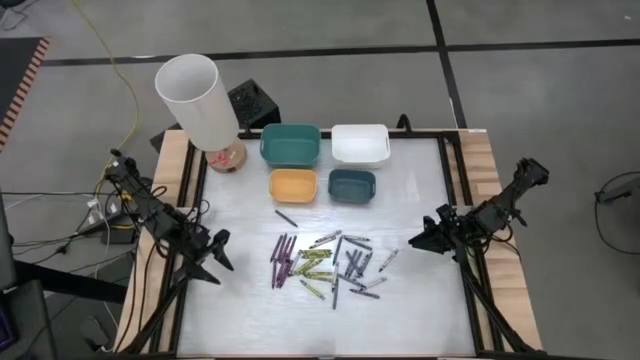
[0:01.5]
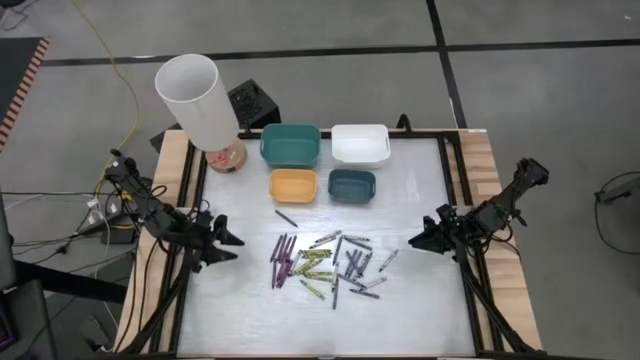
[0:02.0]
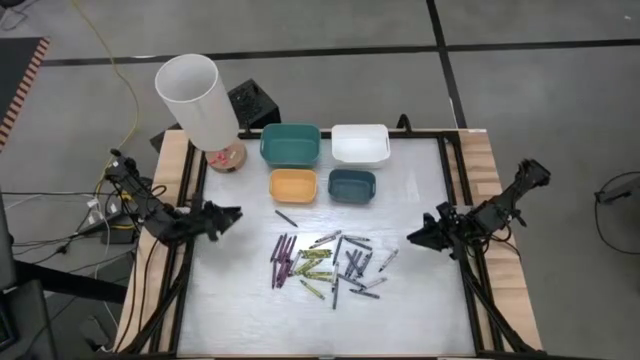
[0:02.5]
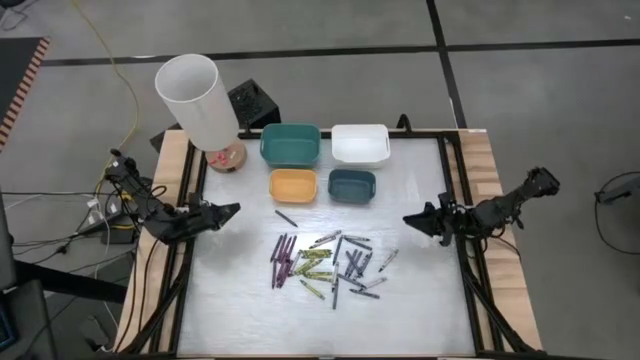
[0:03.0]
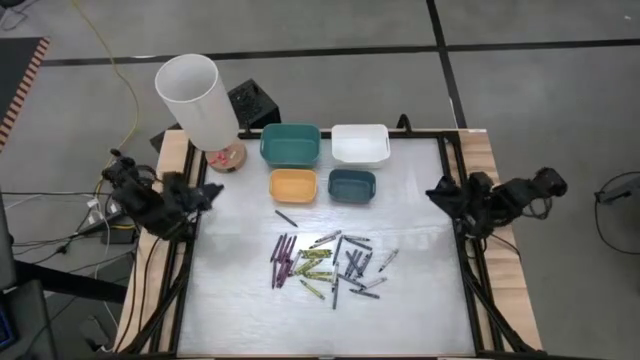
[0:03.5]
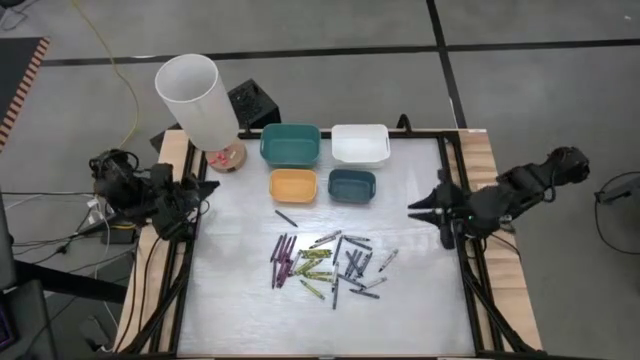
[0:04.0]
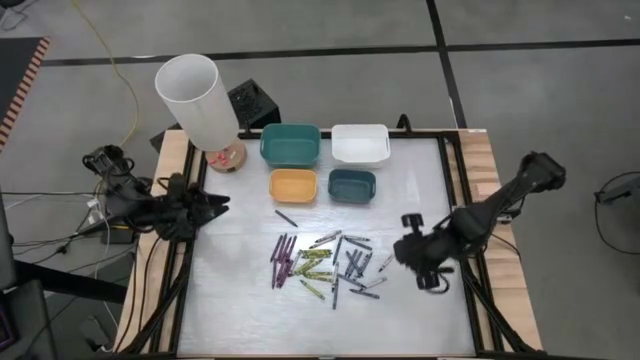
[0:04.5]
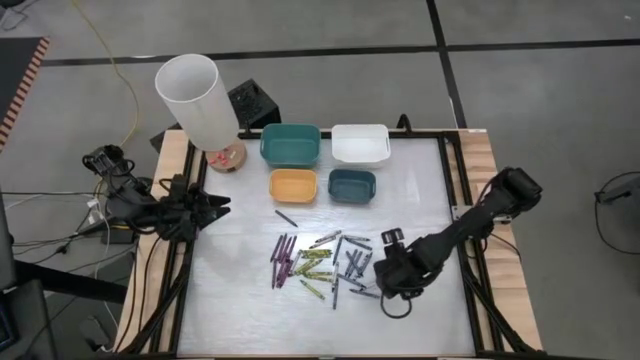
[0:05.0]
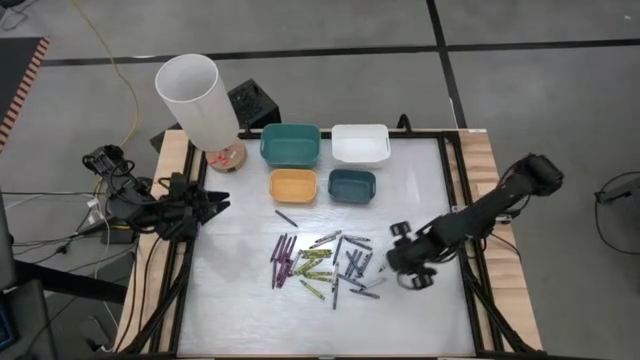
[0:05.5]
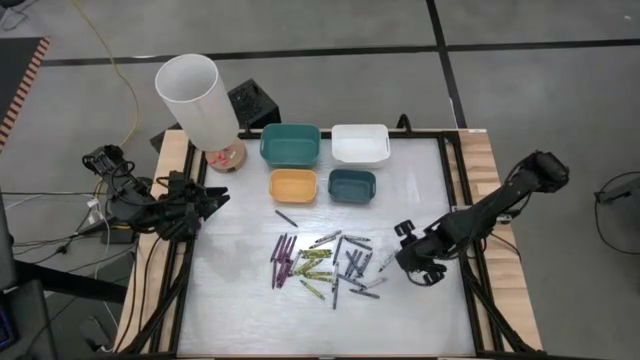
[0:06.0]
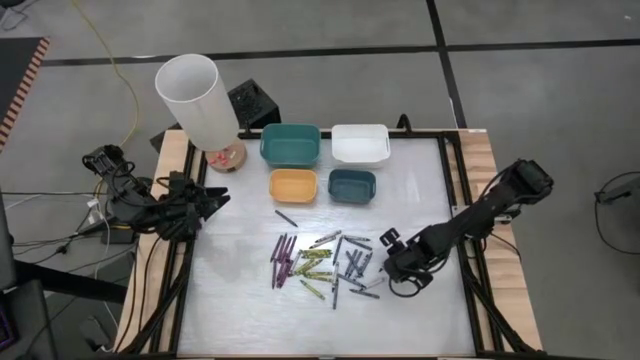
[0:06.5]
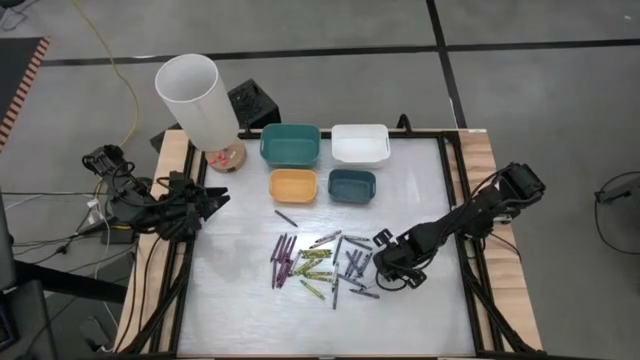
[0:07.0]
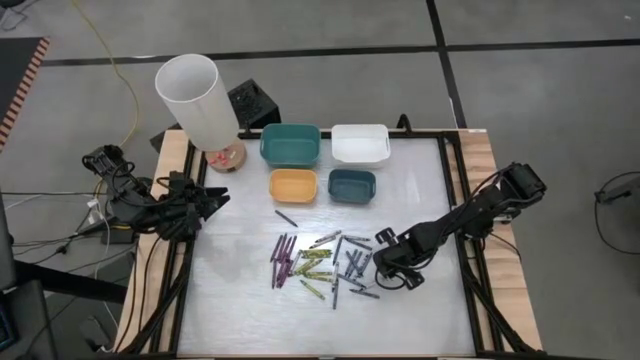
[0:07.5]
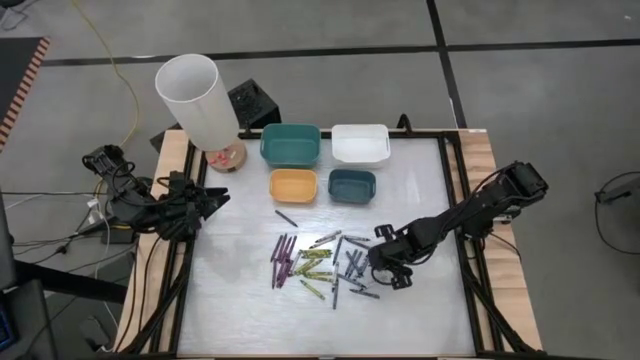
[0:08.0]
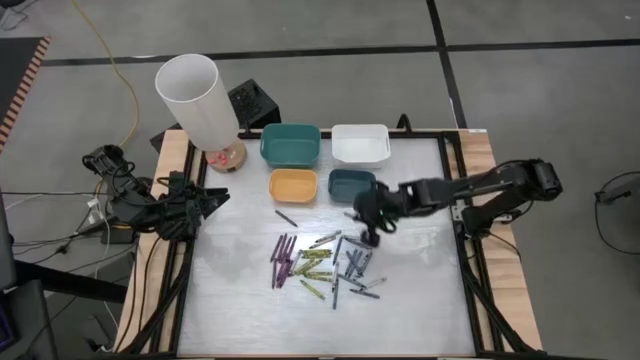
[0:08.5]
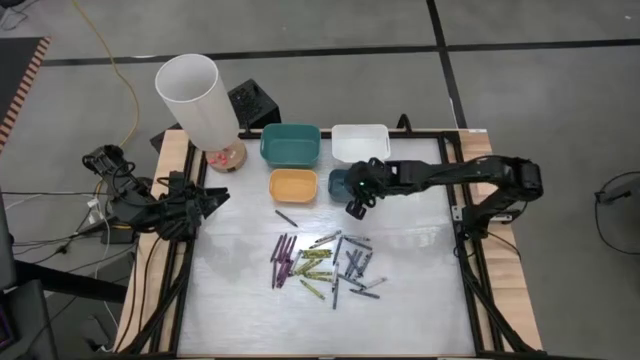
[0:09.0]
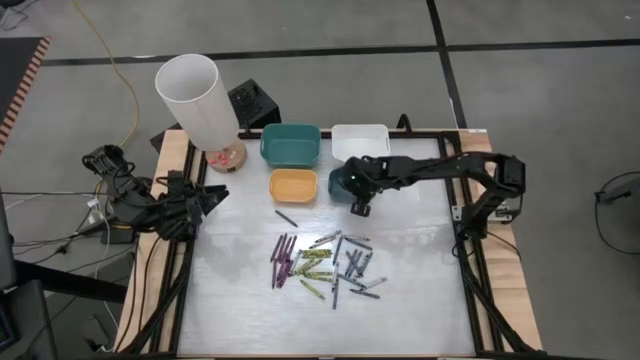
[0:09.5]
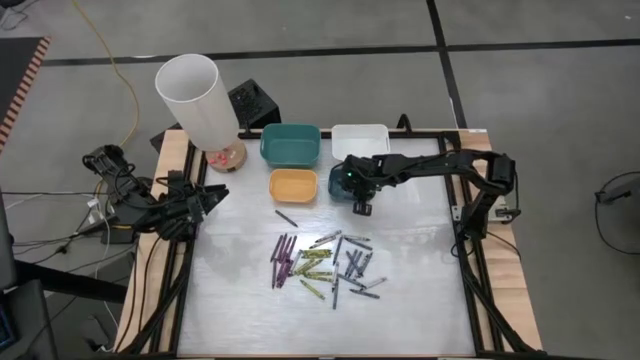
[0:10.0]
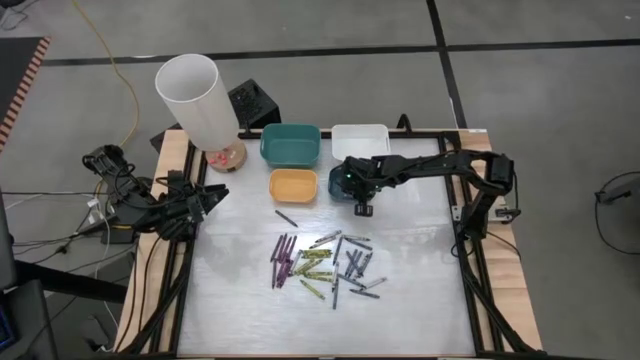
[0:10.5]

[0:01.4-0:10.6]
Task: Sort crayons
Put the black crayon into the blue bin

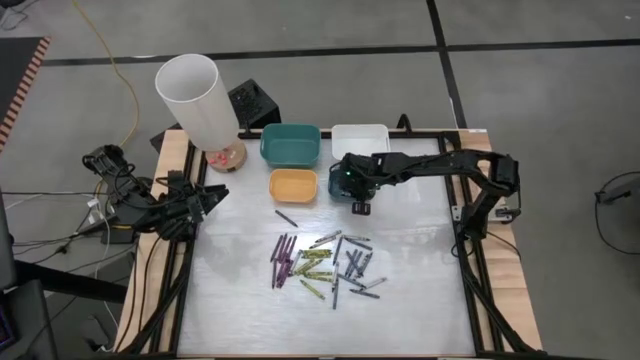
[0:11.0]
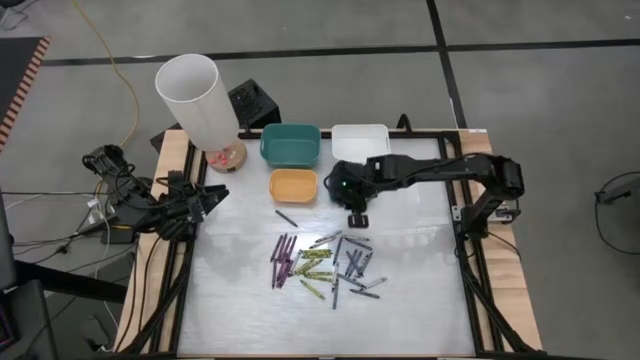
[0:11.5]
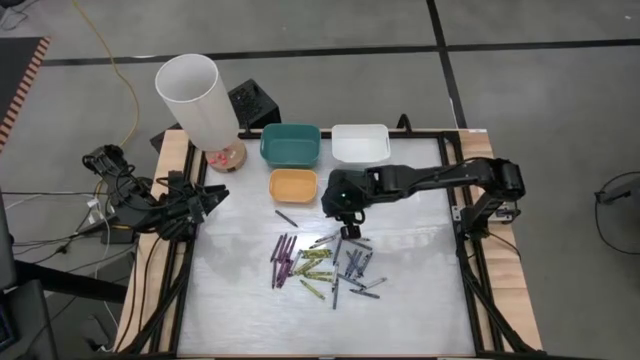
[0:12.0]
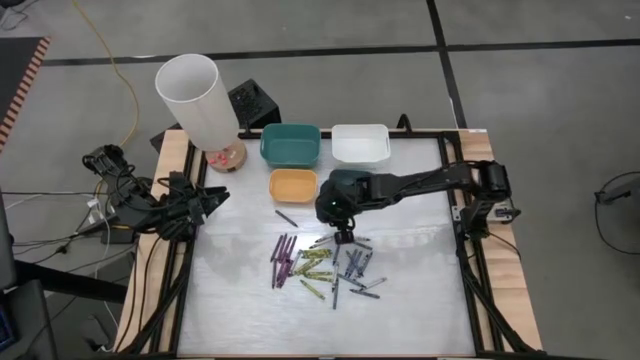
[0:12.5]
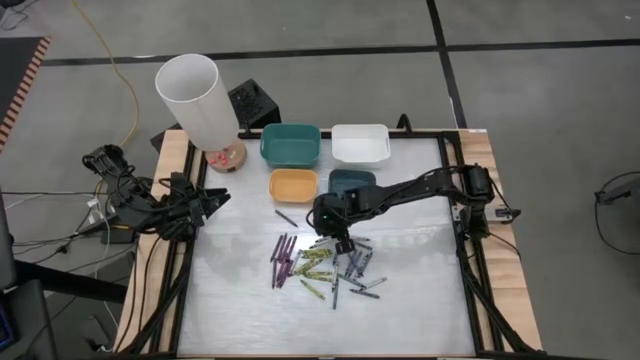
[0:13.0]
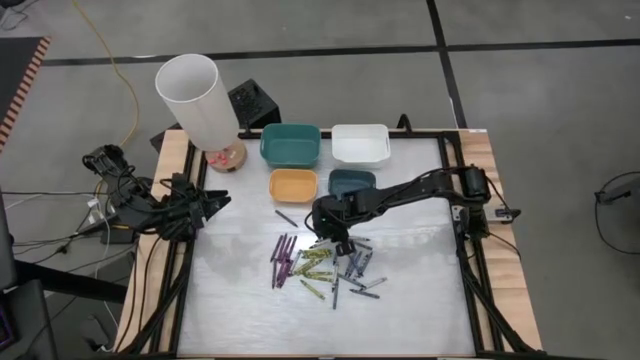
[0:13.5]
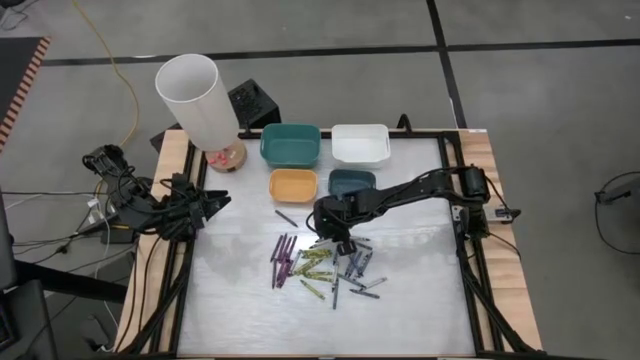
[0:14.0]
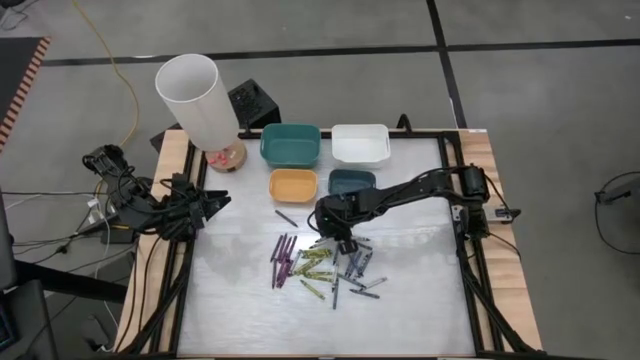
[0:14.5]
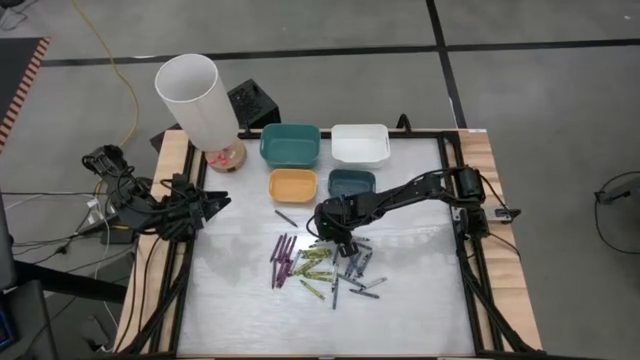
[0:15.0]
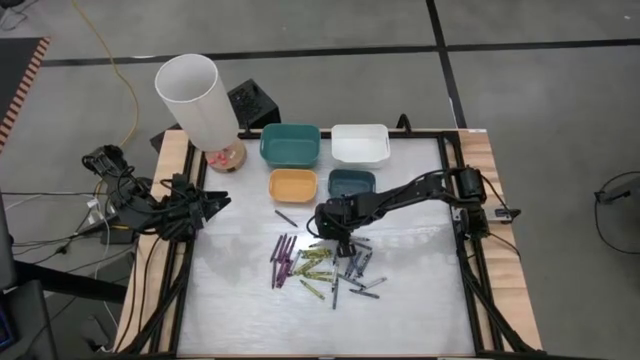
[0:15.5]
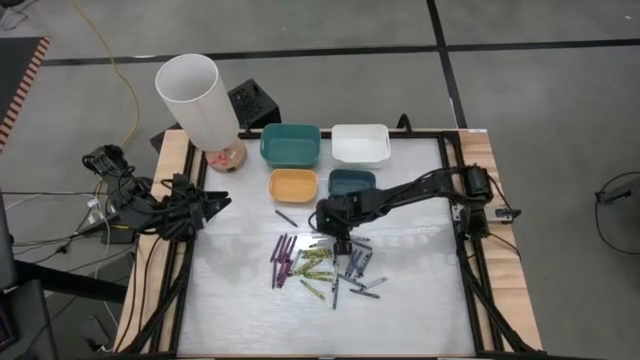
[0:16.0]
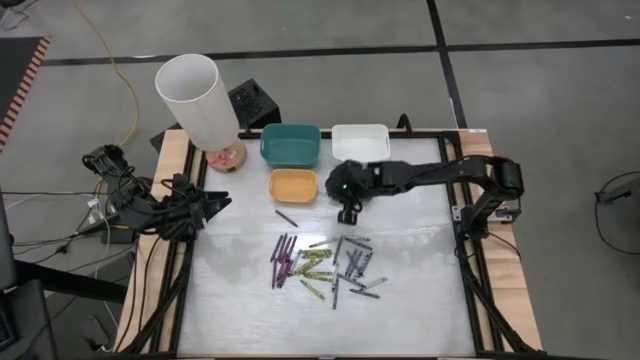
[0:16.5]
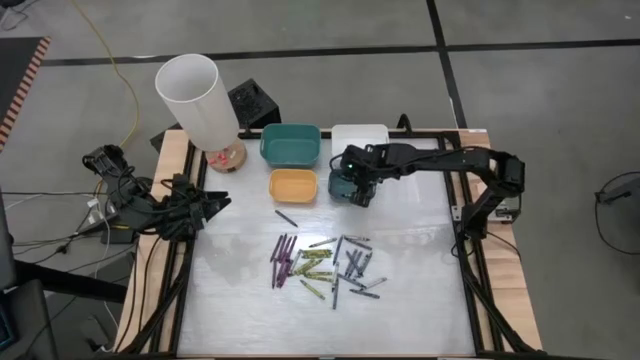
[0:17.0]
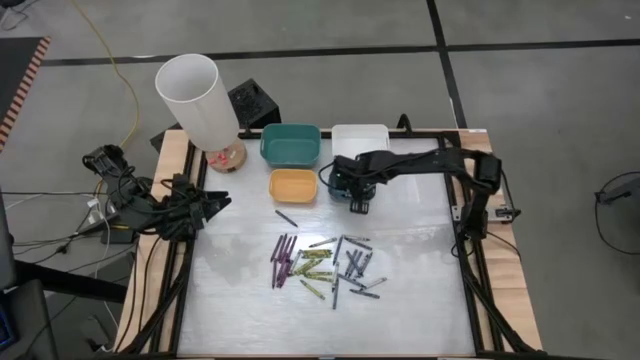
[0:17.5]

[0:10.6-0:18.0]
Put the black crayon into the blue bin

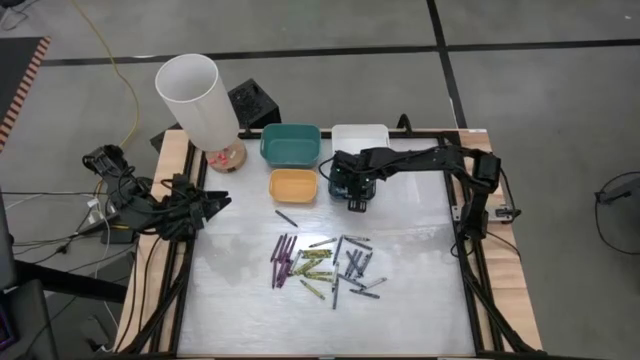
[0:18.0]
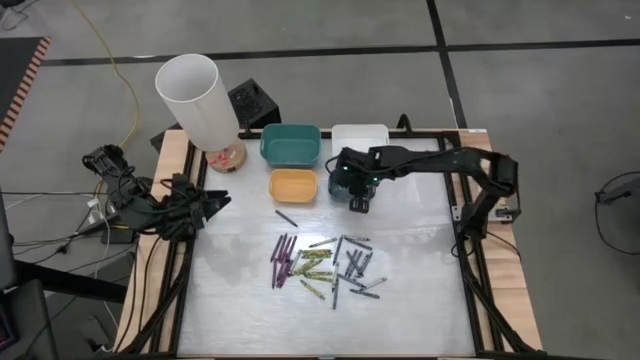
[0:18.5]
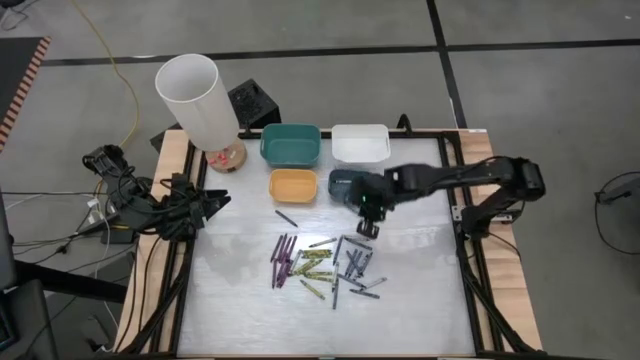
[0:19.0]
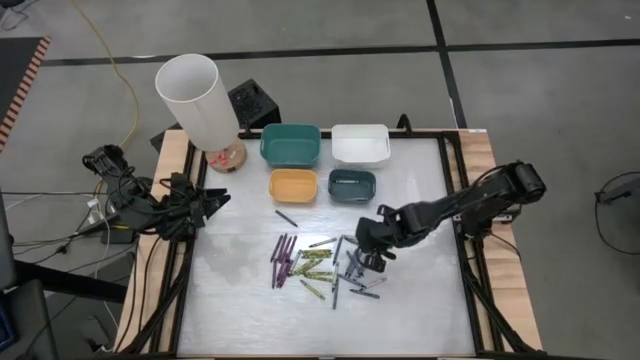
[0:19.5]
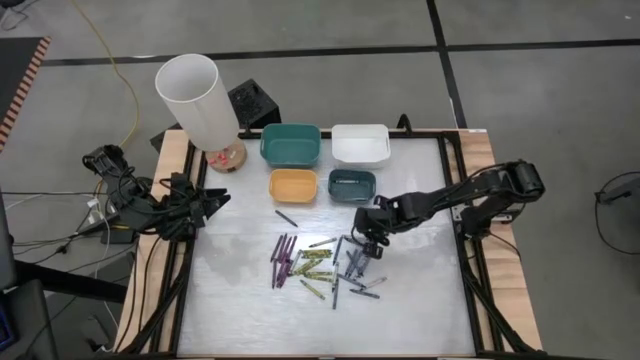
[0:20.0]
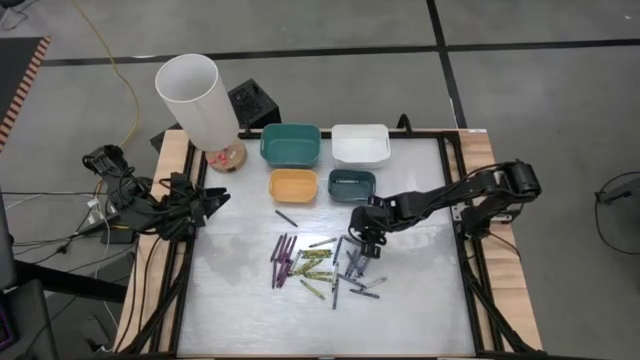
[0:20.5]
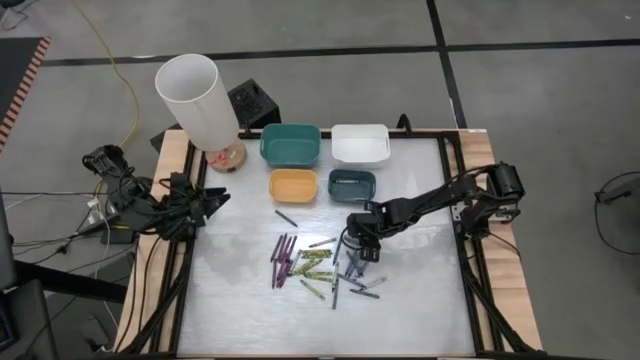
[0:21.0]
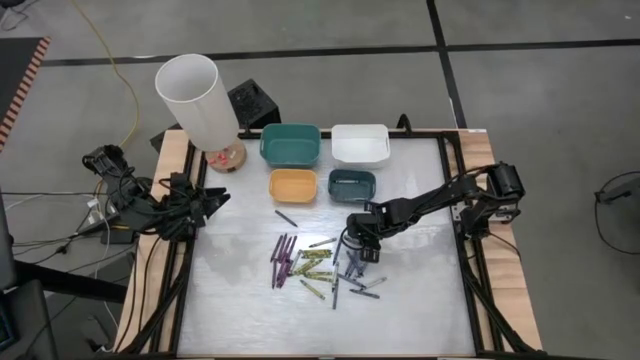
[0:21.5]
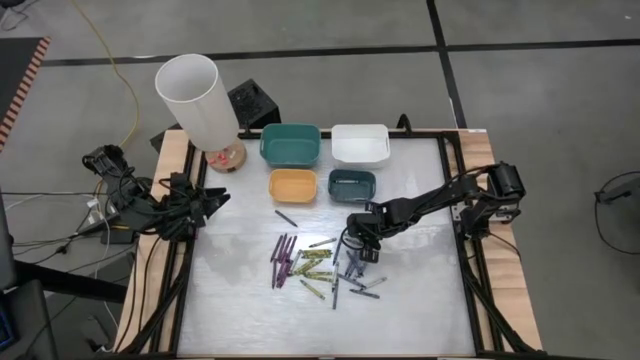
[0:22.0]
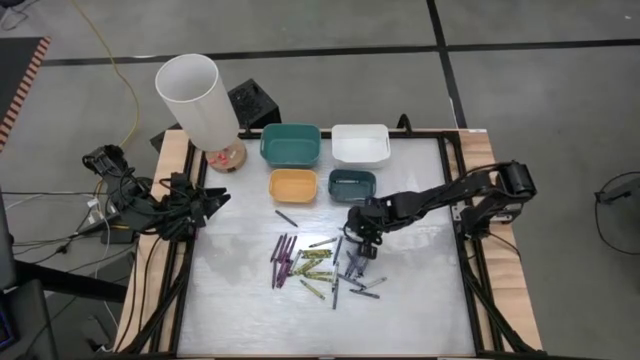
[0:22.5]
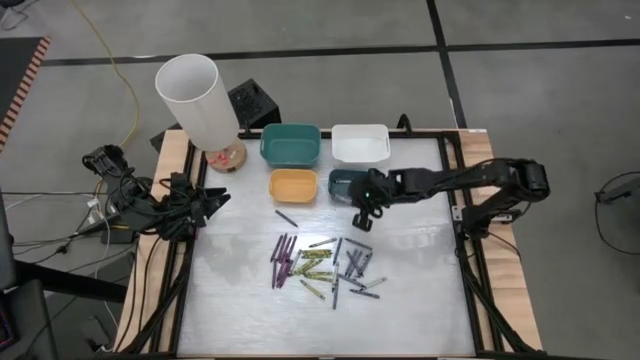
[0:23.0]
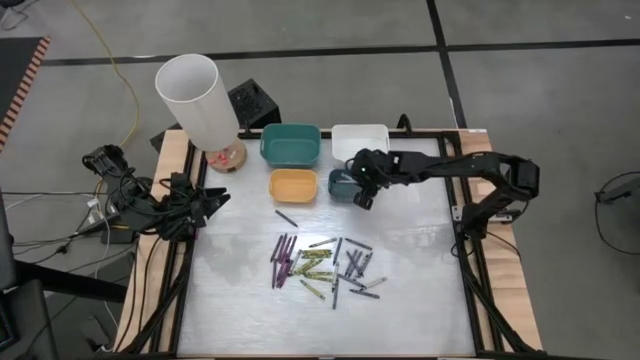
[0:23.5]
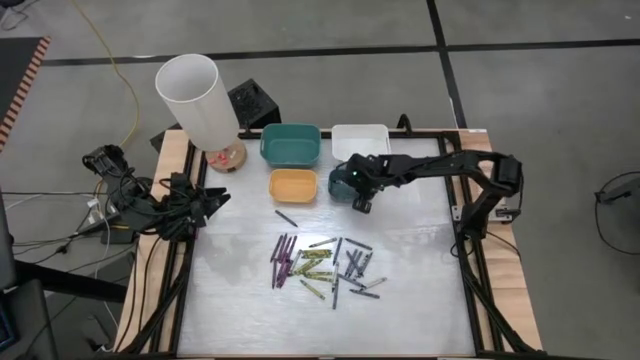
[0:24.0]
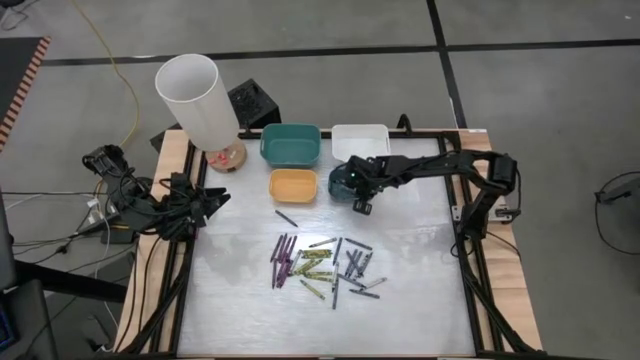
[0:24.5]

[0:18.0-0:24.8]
Put the black crayon into the blue bin
